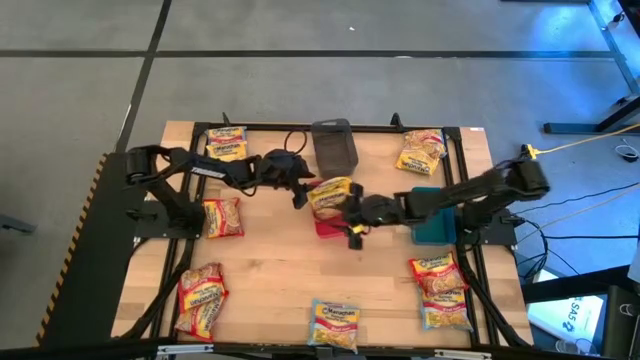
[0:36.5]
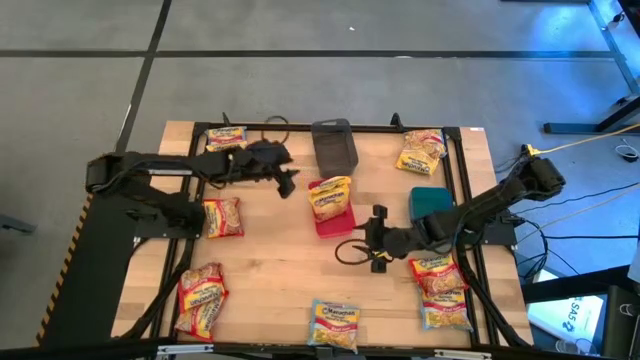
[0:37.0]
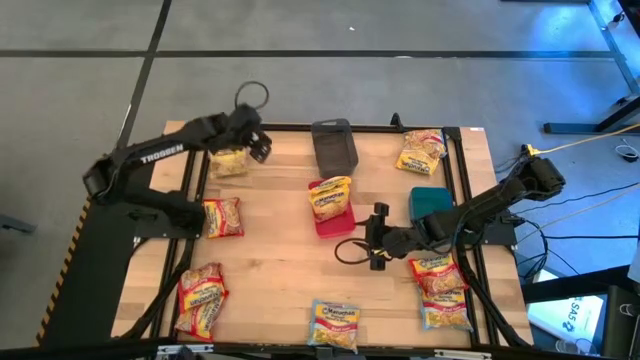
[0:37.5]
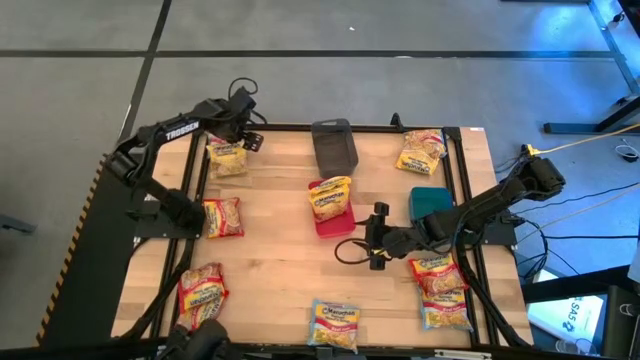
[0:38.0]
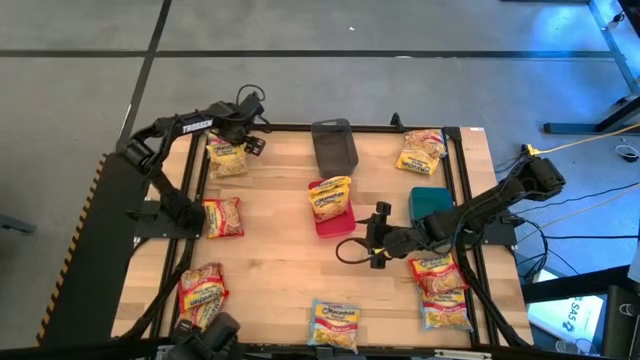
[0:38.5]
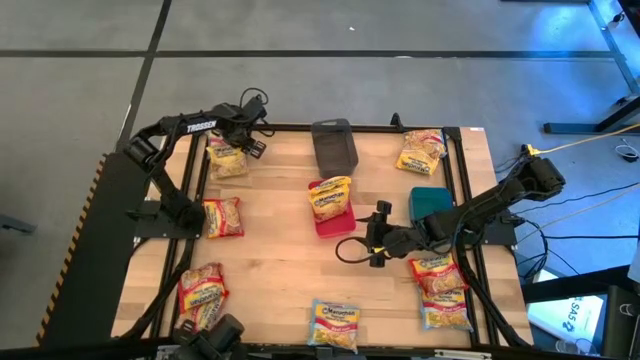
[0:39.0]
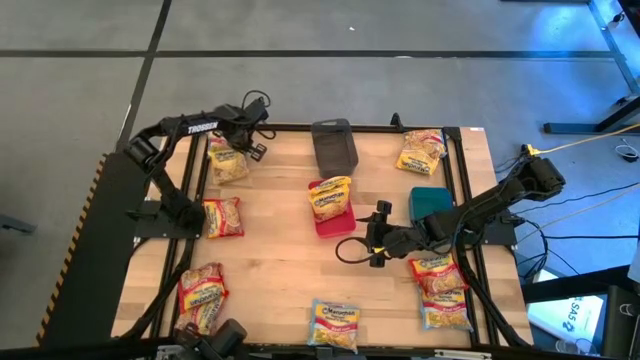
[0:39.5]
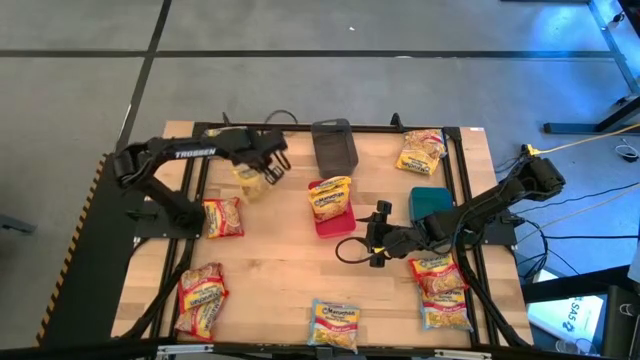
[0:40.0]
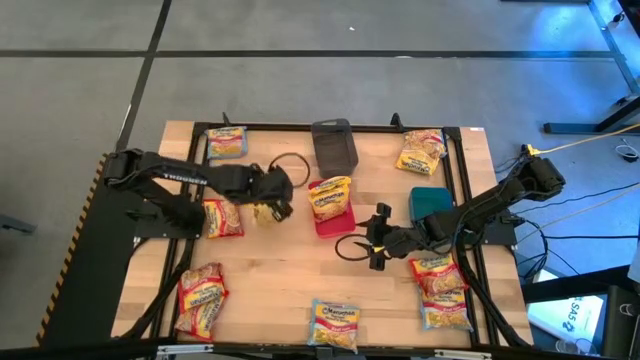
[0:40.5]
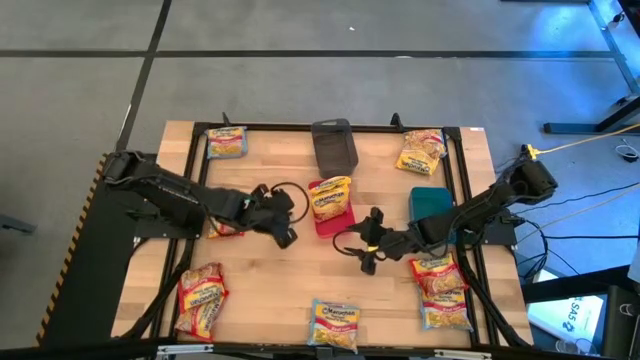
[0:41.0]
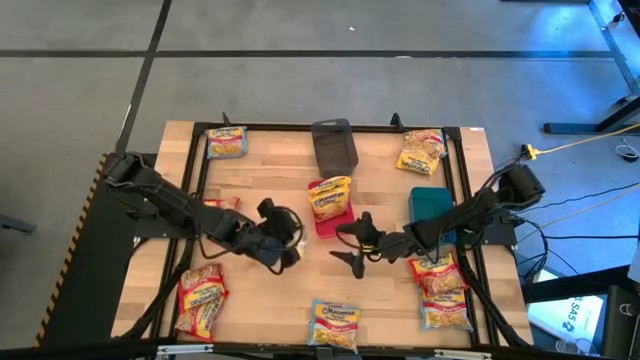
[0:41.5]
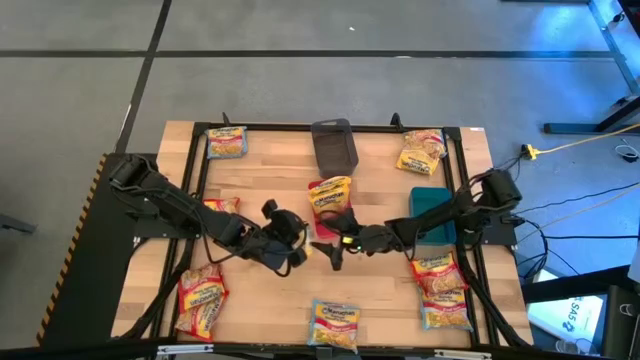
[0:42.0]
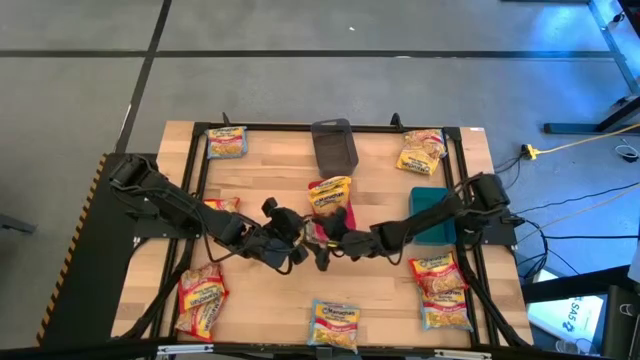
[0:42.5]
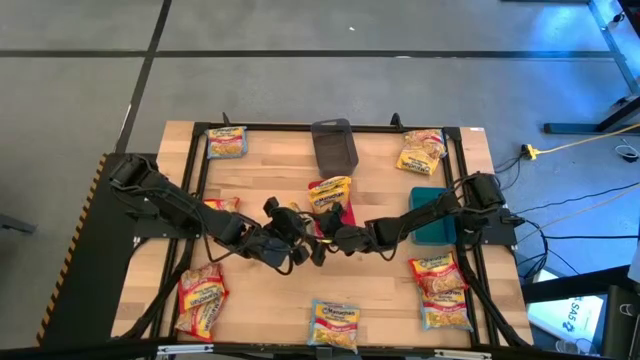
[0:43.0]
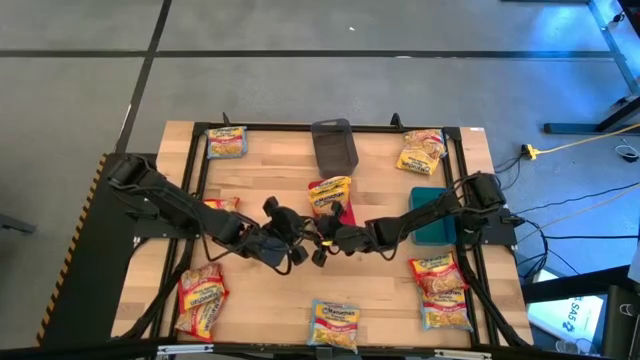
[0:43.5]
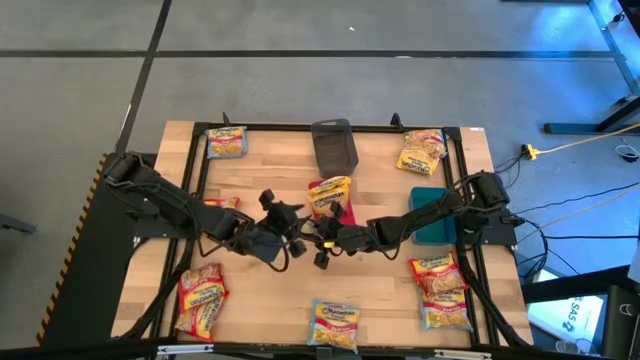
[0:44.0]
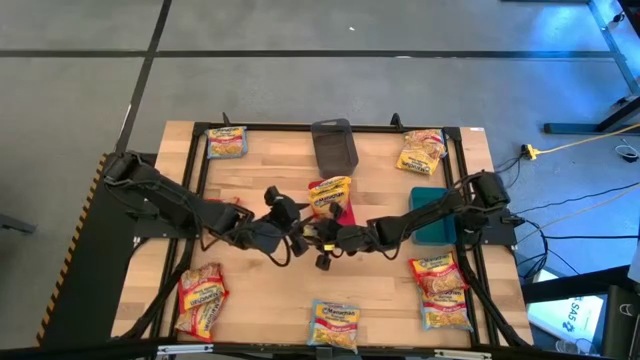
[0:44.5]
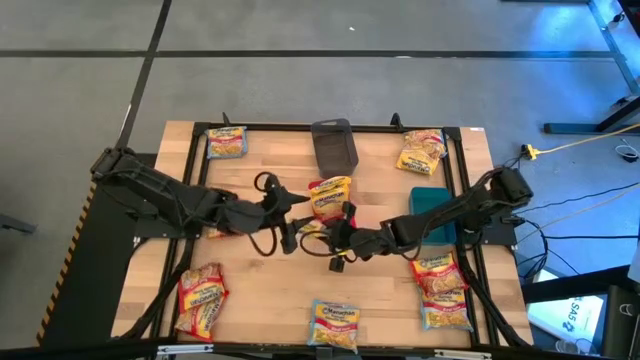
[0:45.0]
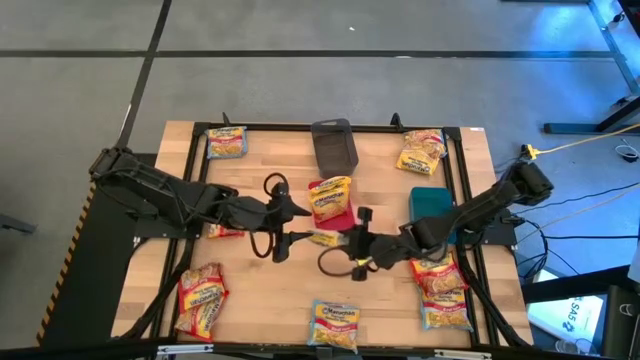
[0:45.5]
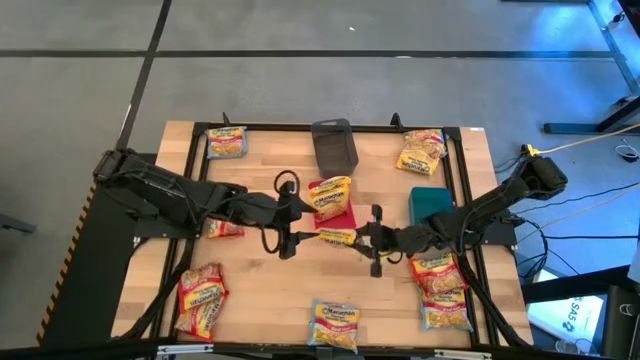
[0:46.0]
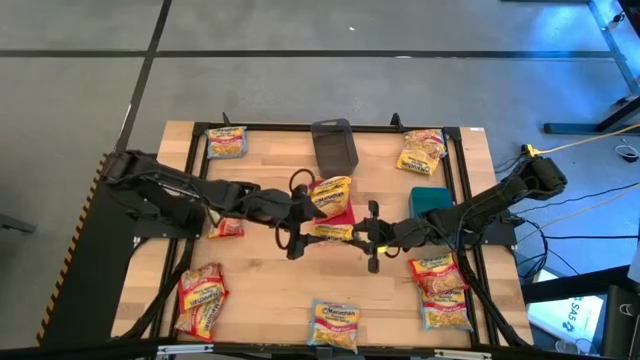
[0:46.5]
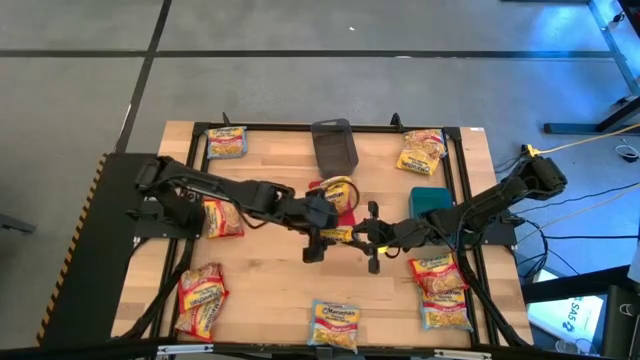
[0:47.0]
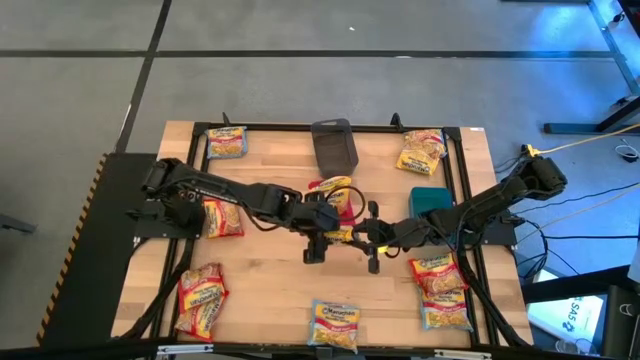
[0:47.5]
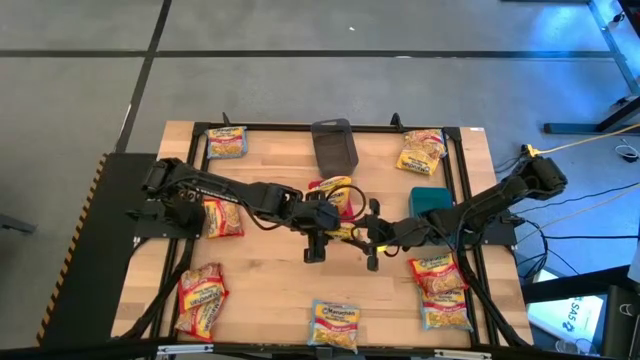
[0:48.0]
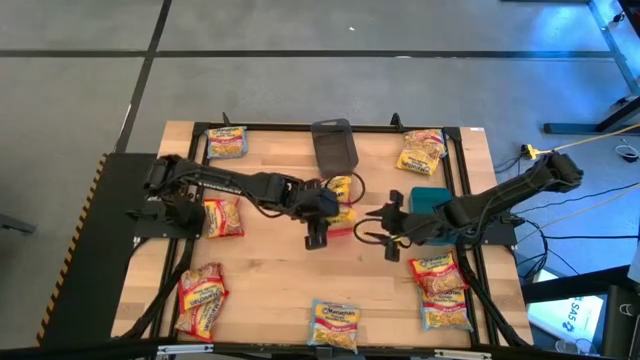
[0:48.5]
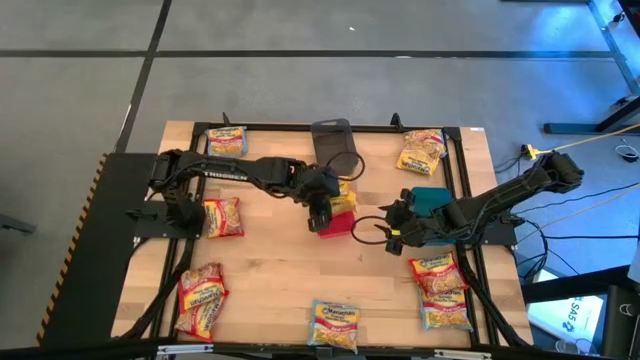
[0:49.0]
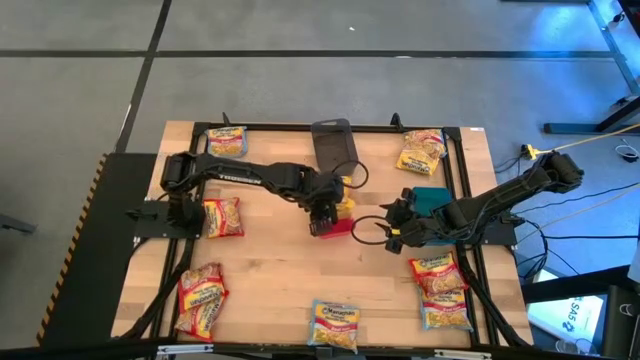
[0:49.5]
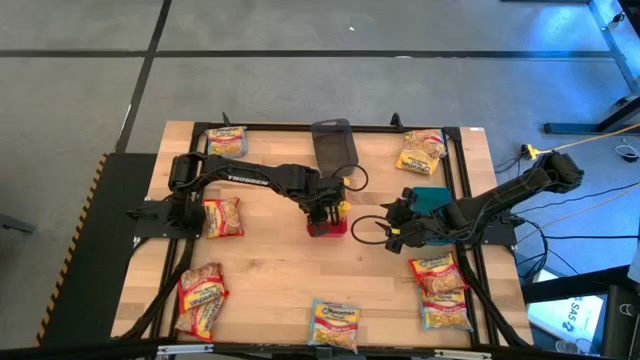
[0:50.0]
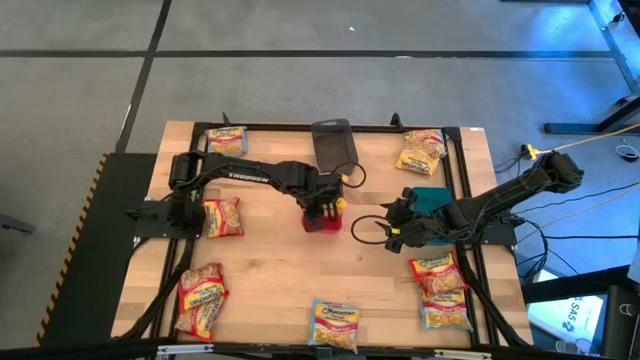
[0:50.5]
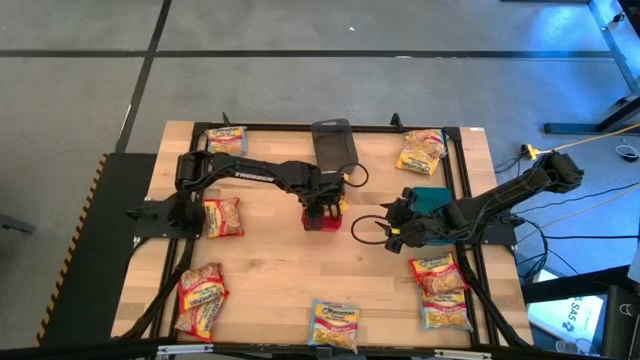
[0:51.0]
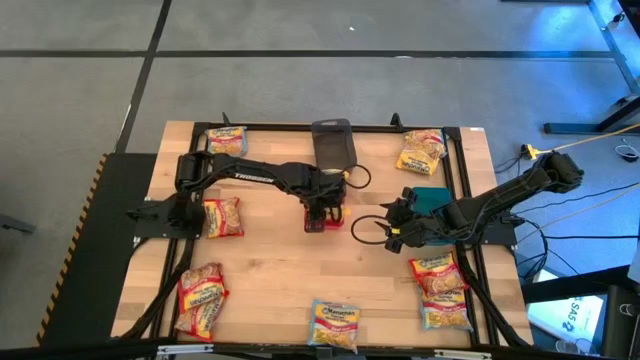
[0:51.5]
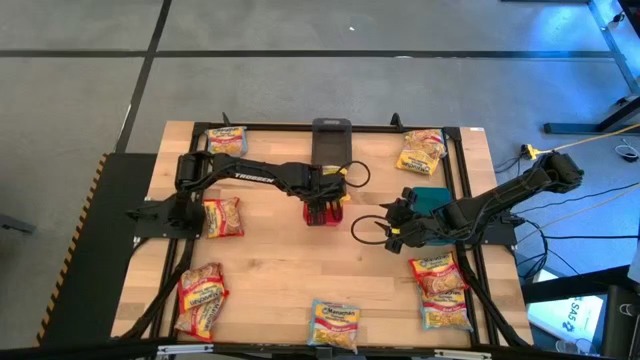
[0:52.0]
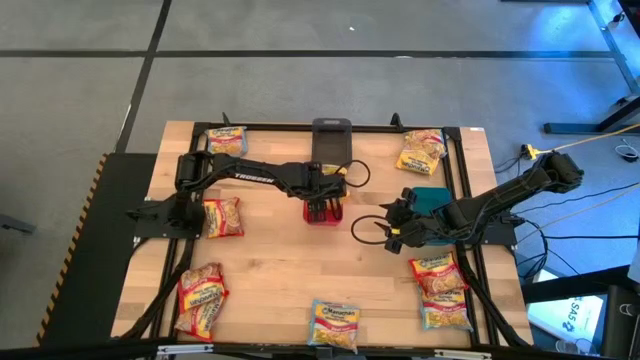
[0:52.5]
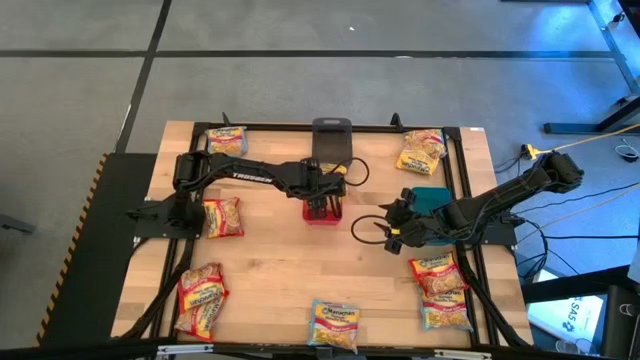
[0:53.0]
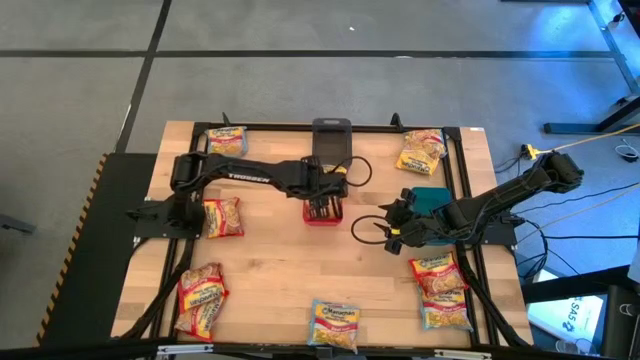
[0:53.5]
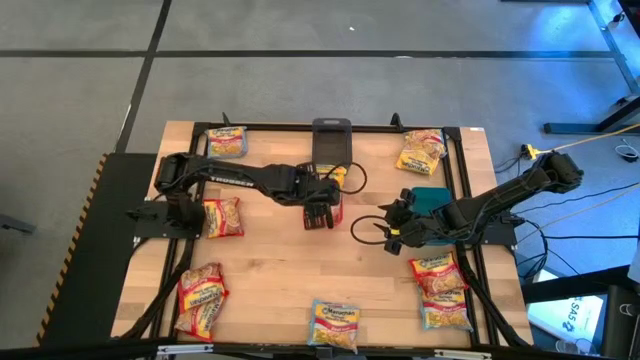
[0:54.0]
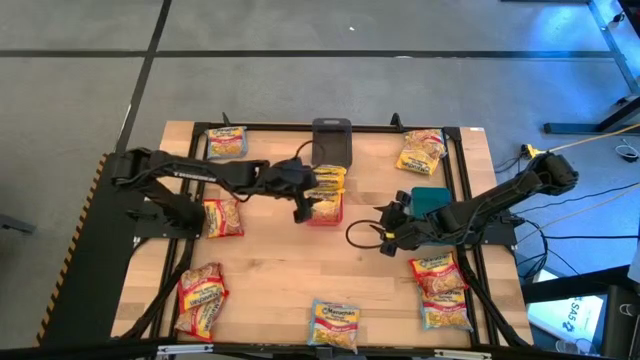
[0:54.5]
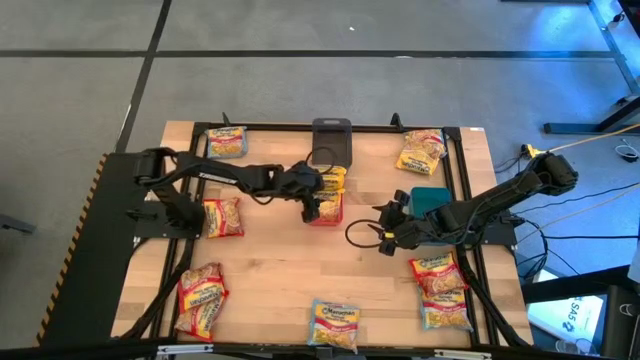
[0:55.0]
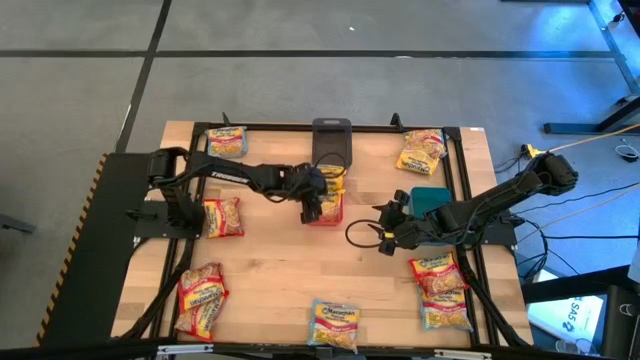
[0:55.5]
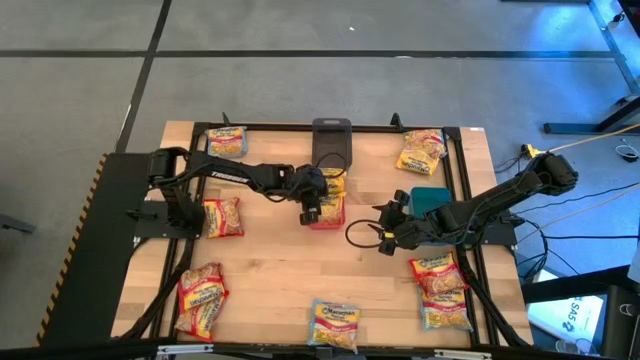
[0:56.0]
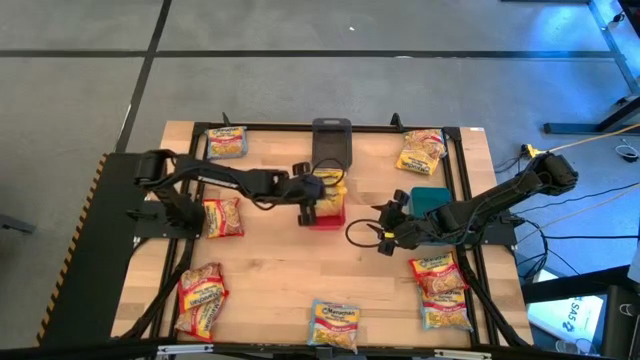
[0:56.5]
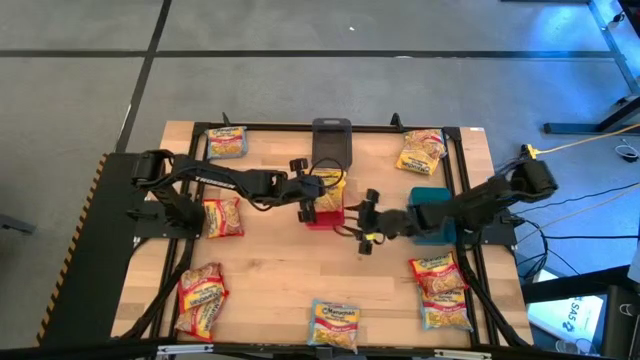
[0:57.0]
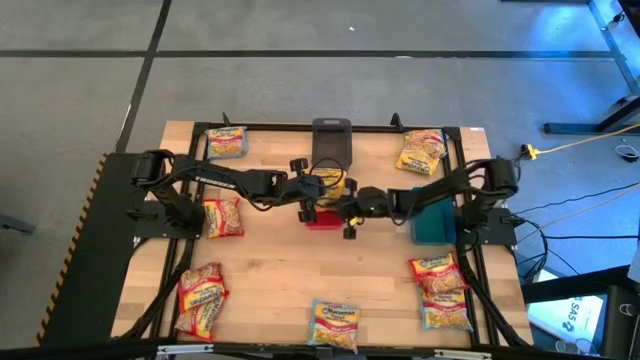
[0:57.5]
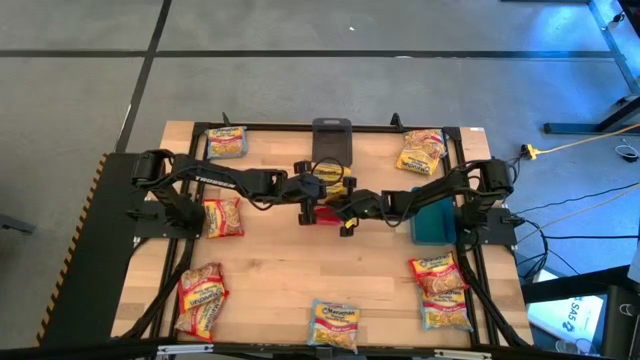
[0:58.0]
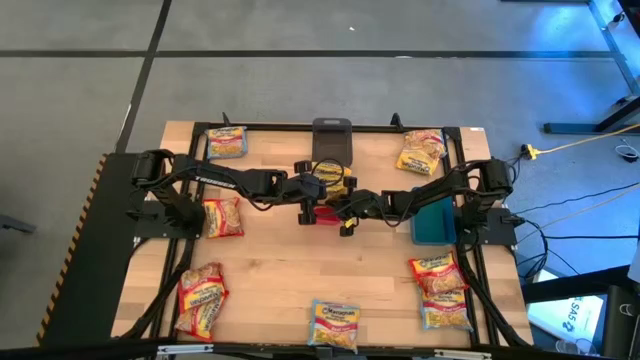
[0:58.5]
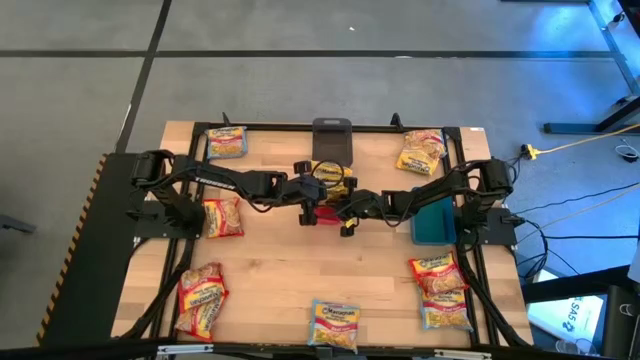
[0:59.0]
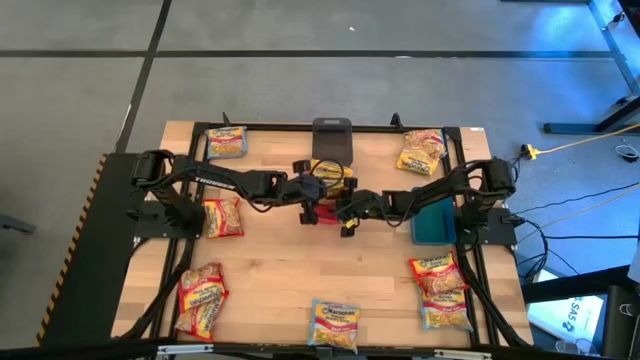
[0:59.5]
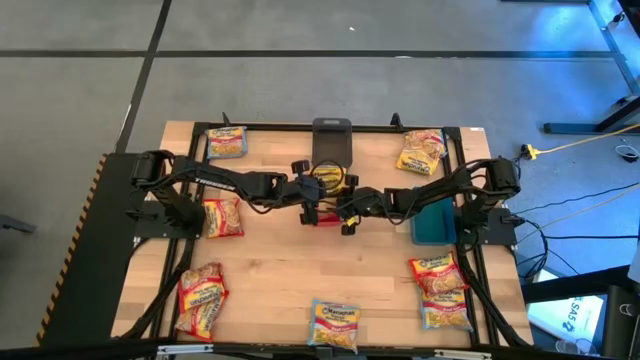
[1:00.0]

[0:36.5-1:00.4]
Task: Sort Maruchan noodles
Put the yellow noodle pack into the red bin
